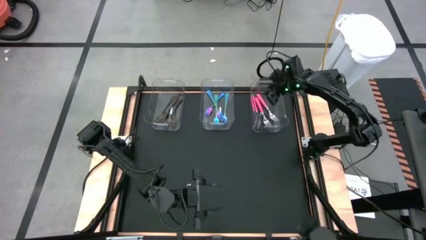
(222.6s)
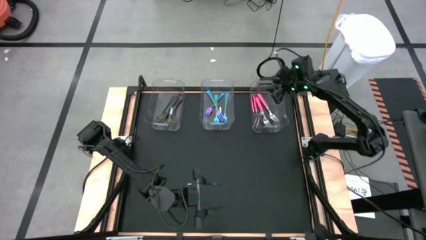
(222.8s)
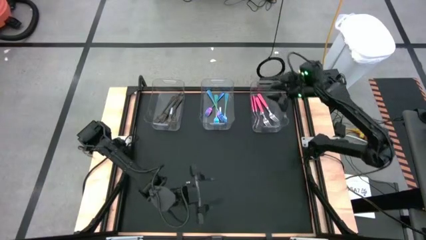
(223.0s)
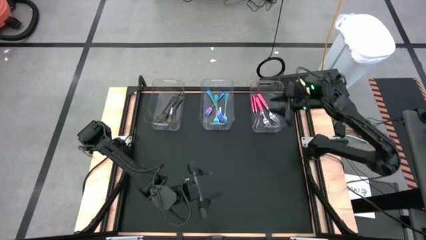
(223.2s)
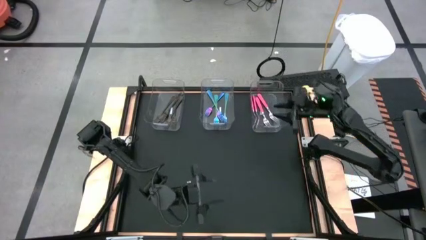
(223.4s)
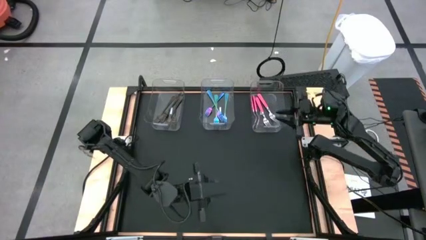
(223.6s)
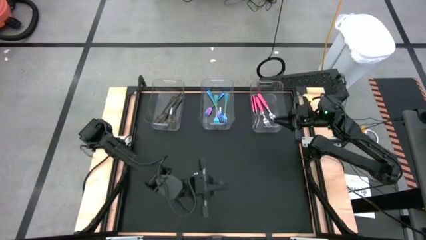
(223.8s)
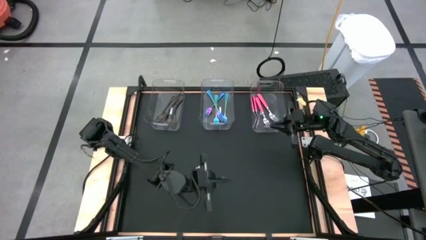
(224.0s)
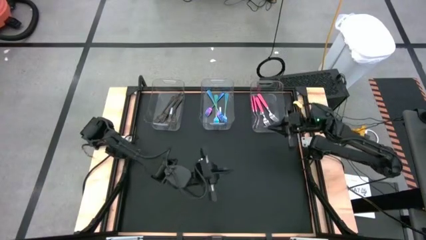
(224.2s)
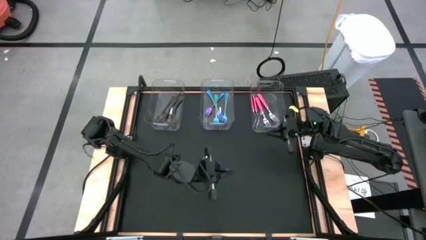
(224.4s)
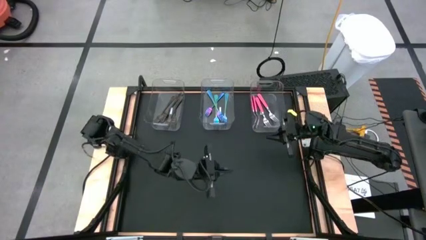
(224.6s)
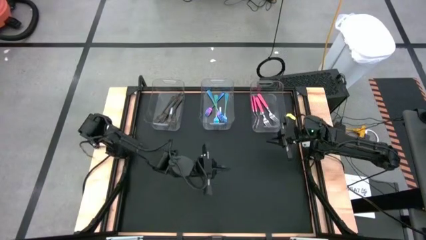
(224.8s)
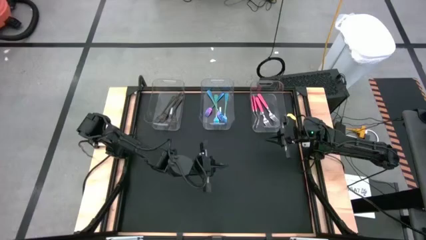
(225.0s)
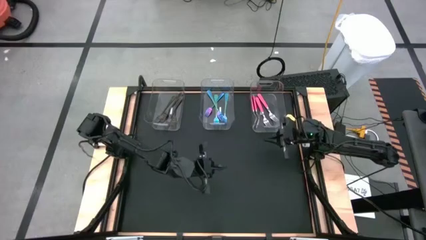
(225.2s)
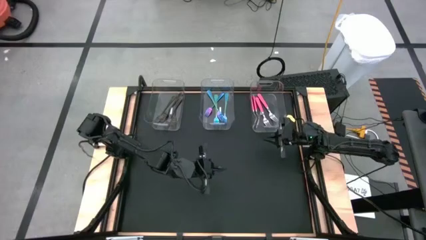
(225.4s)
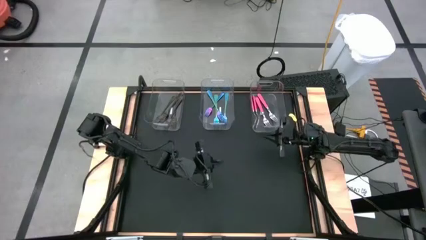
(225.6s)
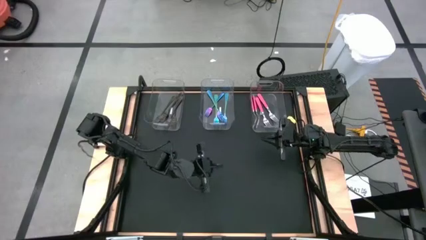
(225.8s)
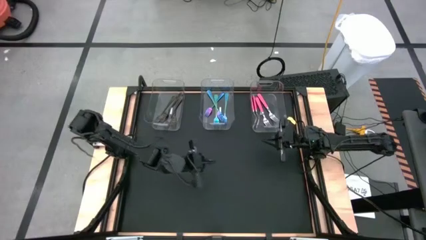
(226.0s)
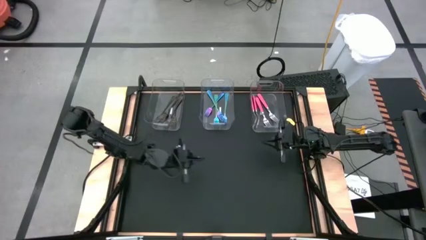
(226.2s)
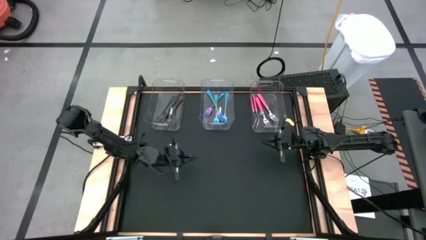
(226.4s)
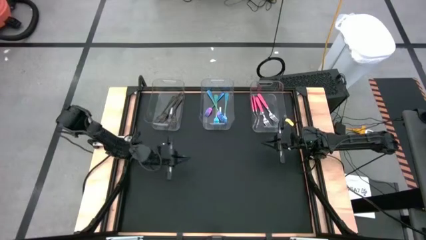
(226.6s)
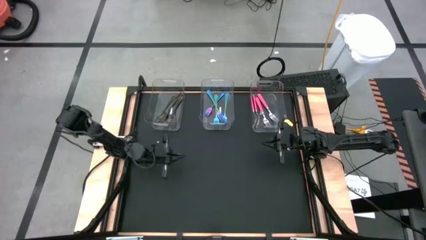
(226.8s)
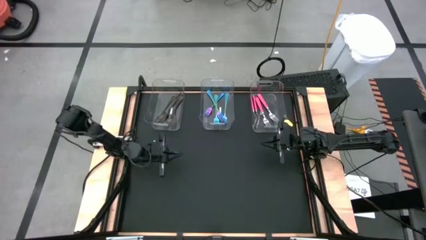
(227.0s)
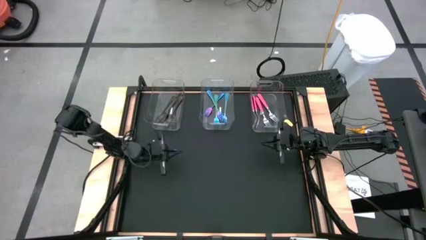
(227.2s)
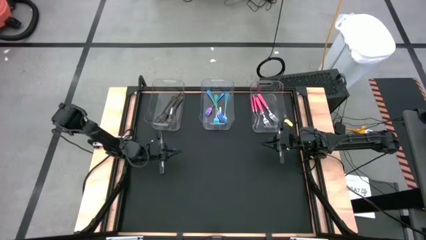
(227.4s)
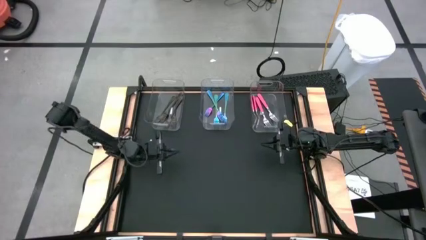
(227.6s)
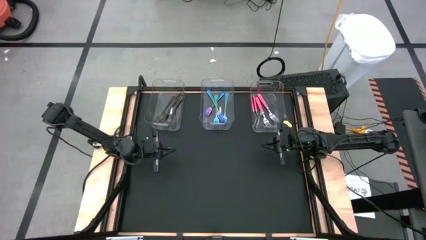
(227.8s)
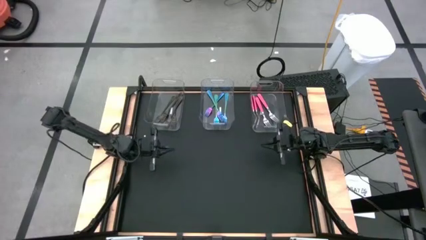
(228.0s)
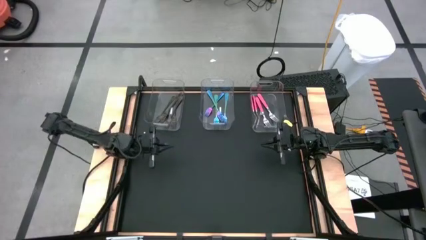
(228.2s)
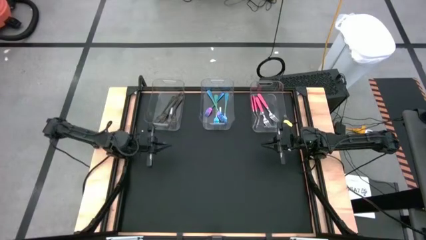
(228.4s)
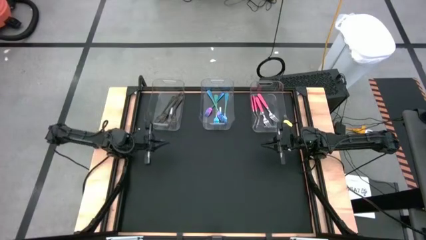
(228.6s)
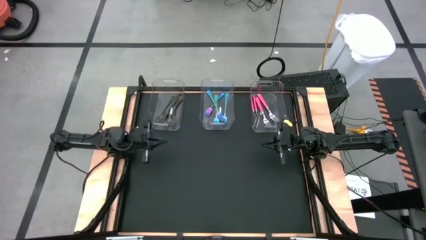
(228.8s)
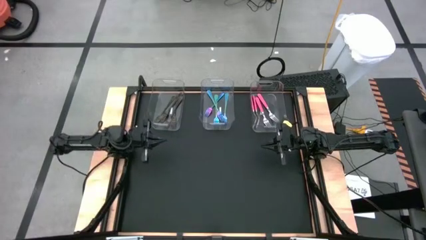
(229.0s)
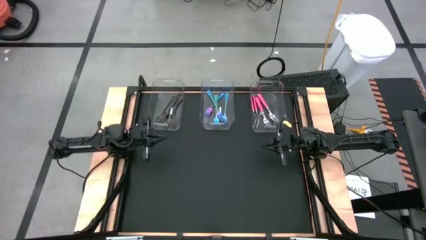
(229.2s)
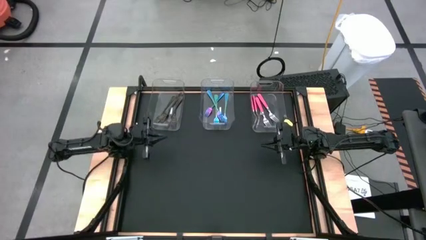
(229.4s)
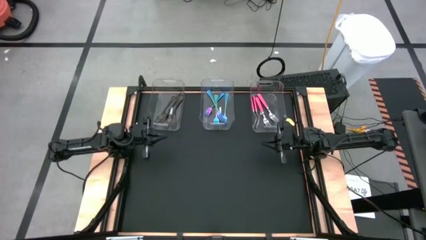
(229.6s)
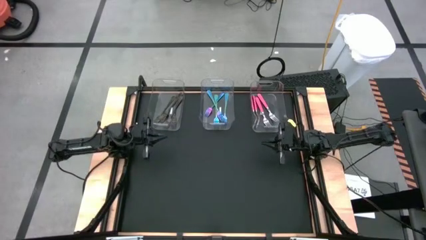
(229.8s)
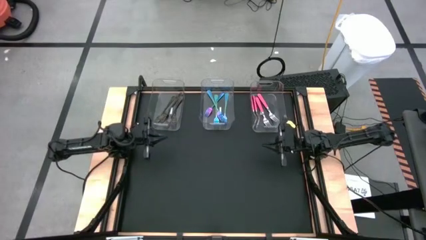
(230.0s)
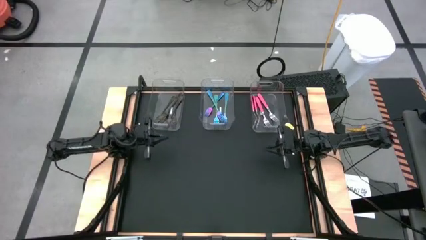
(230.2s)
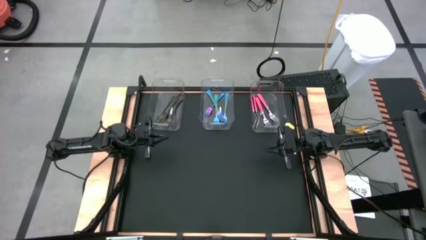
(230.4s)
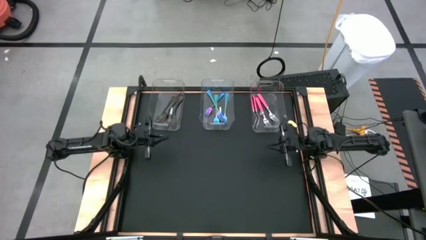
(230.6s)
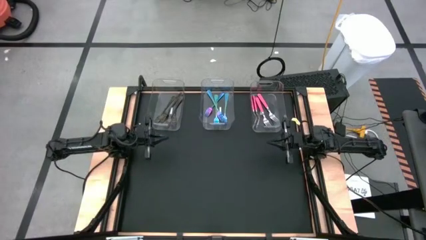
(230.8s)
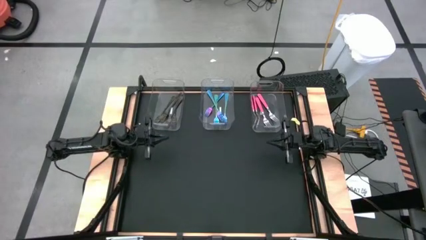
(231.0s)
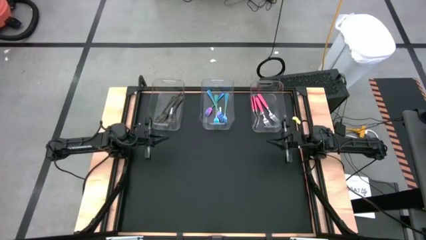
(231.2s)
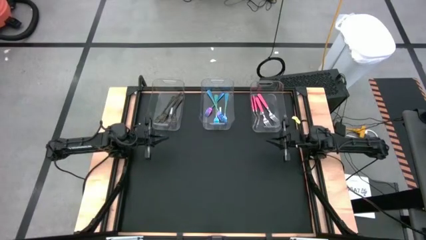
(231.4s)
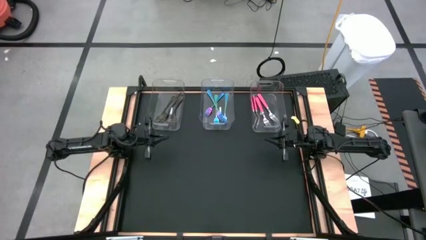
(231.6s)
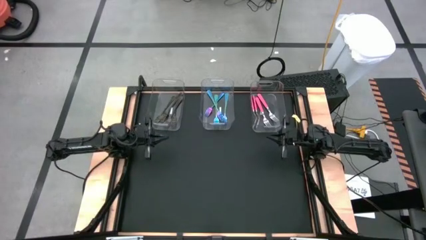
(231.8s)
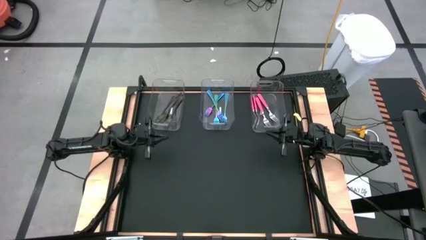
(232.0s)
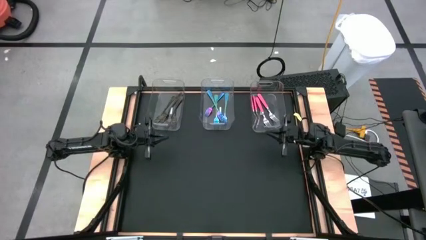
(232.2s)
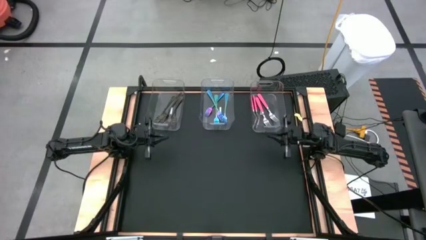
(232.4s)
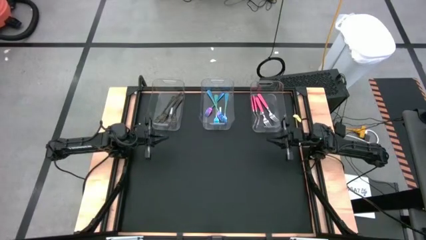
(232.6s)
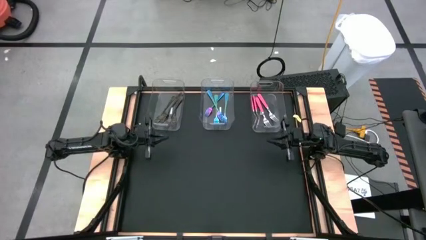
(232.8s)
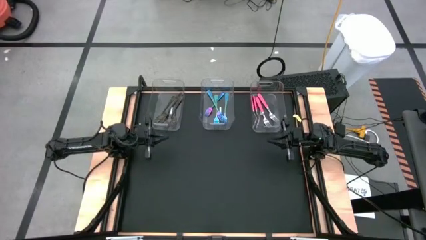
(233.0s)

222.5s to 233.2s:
Task: Sort silverware by color (type)
Return to Home Position

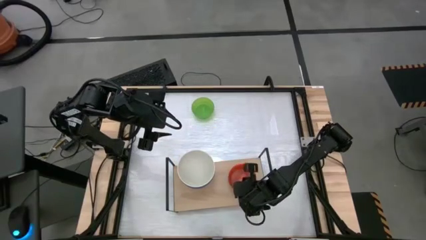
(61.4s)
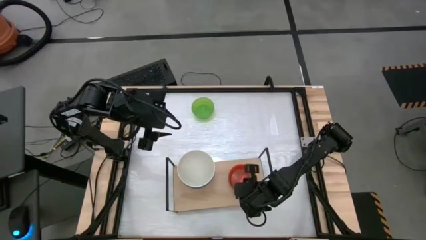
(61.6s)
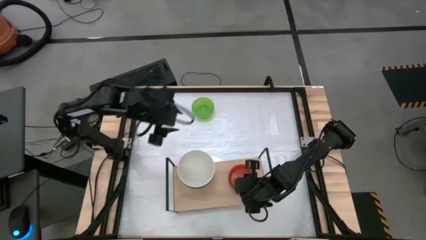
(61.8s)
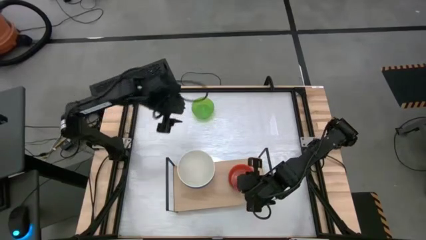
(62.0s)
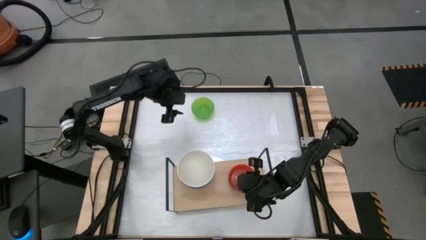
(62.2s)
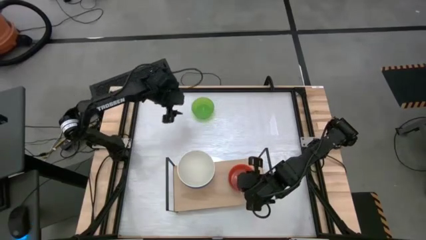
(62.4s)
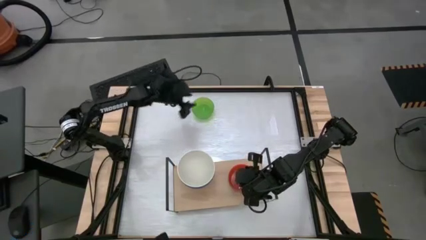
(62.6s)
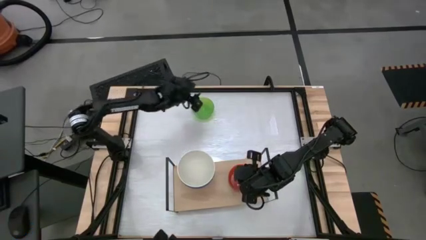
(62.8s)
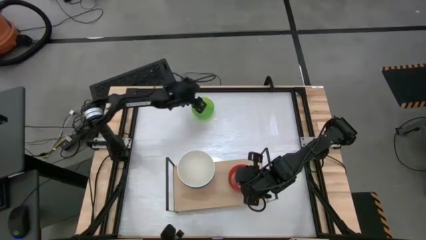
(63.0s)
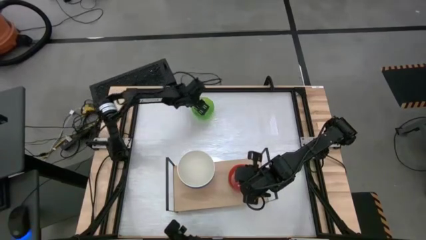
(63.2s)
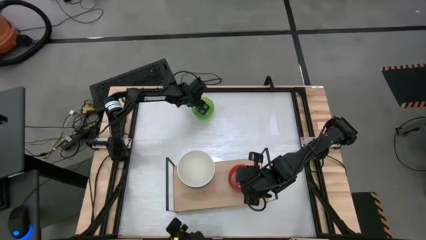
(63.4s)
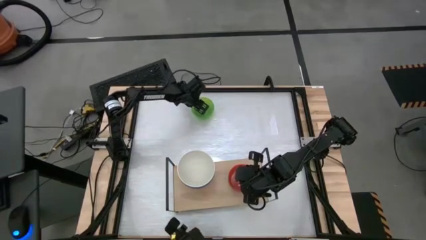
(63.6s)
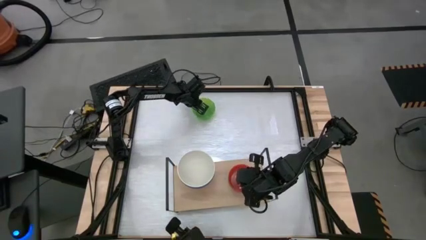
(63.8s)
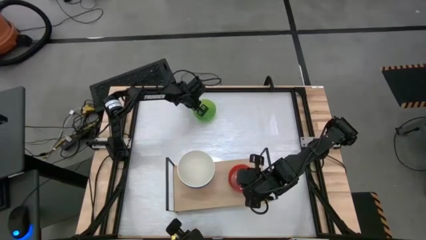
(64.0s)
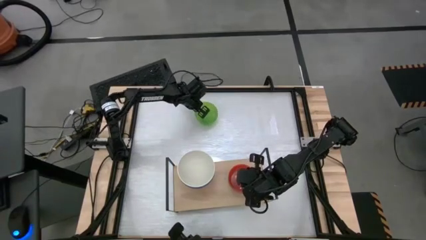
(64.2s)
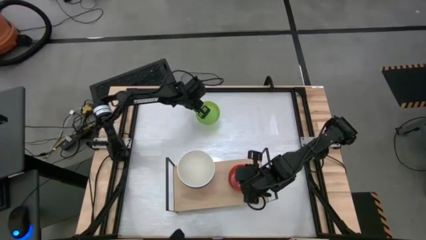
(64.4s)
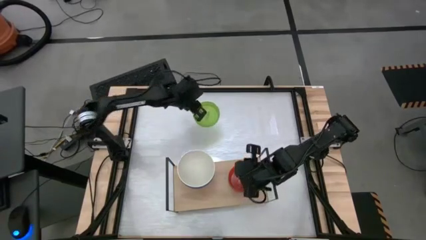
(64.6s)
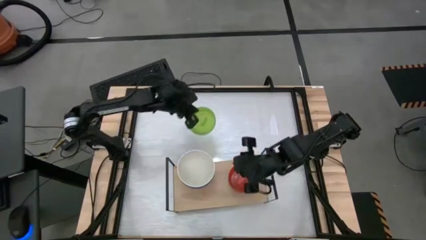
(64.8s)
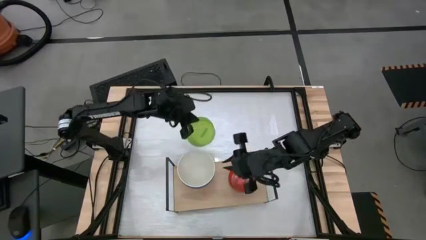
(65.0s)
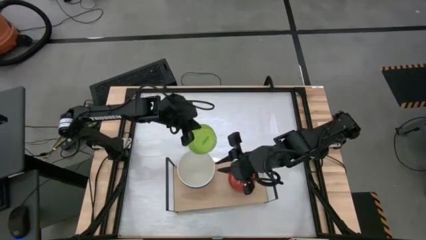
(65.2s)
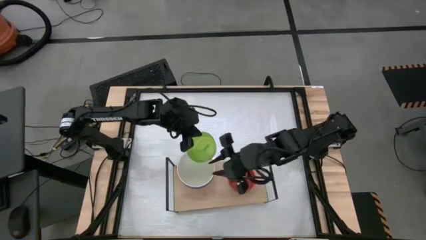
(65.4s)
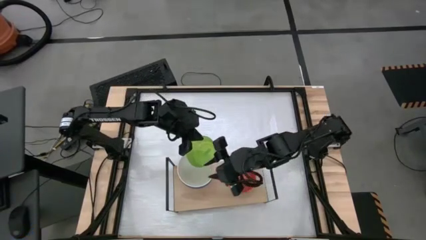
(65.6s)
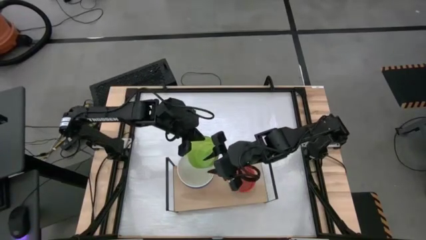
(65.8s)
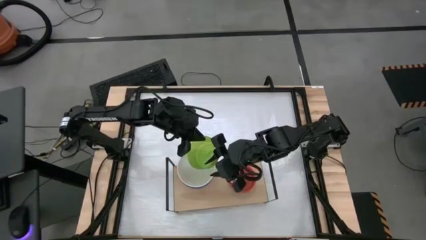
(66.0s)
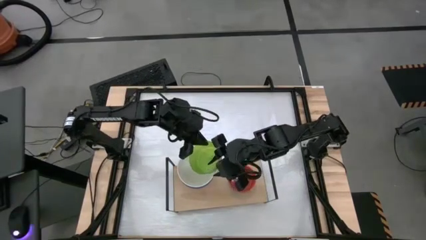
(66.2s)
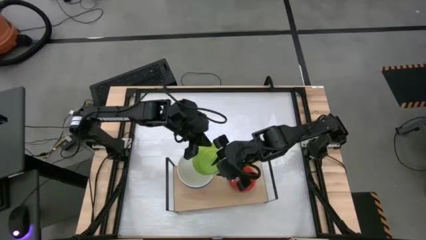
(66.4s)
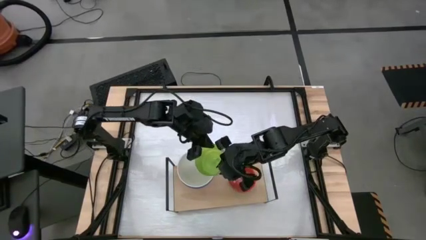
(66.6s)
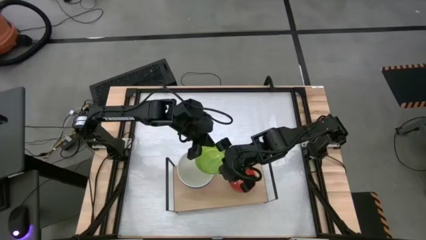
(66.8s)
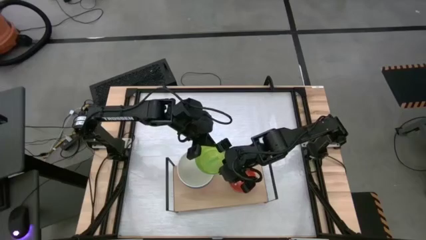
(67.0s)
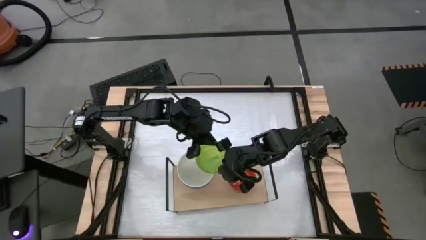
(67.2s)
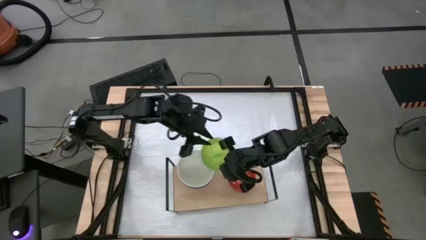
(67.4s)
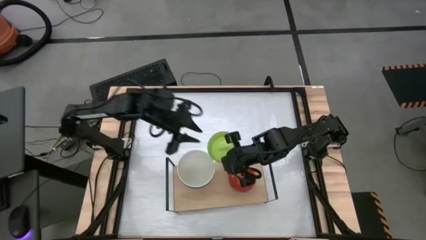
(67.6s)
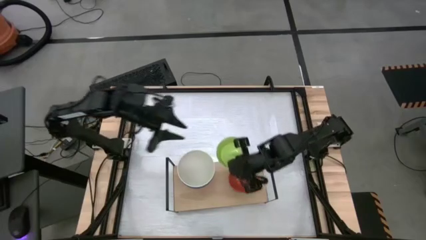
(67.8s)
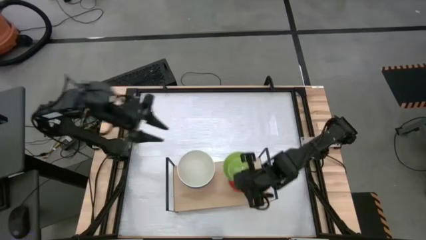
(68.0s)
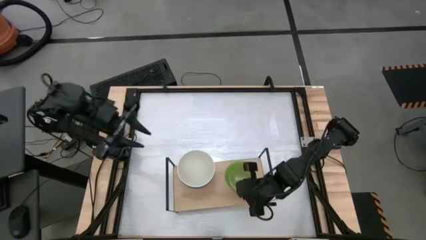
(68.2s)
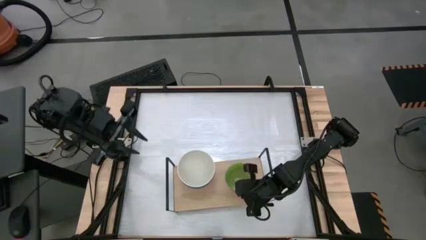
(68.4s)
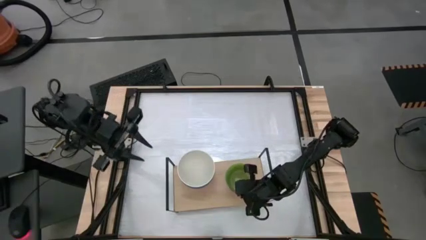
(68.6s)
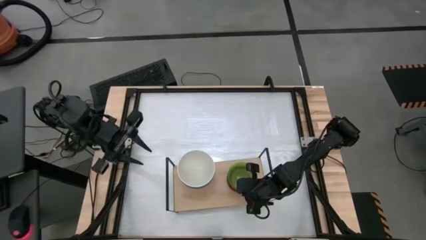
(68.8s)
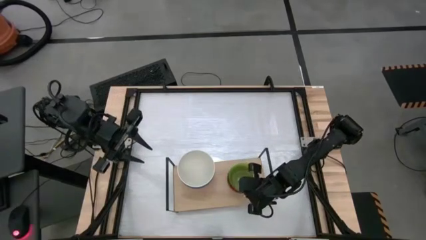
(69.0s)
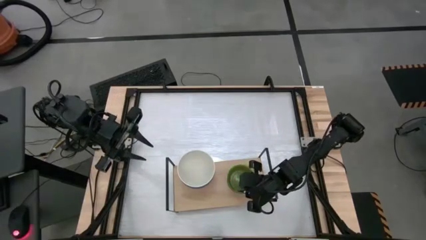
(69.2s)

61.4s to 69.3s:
Task: Place and stack bowls onto a shelf
Stack the small green bowl on top of the small orange bowl on the shelf
